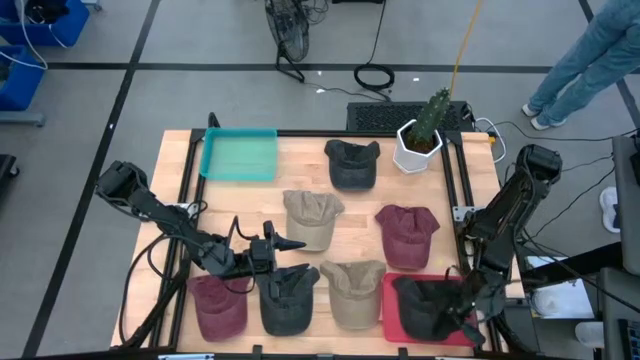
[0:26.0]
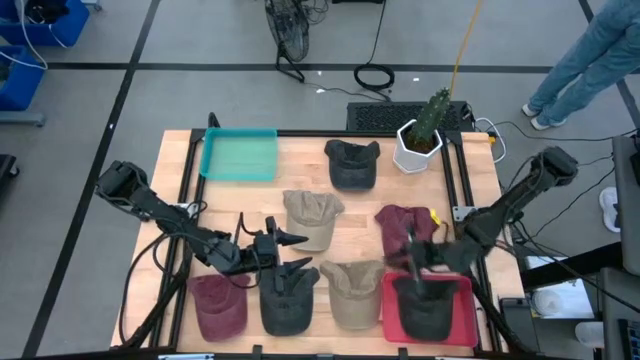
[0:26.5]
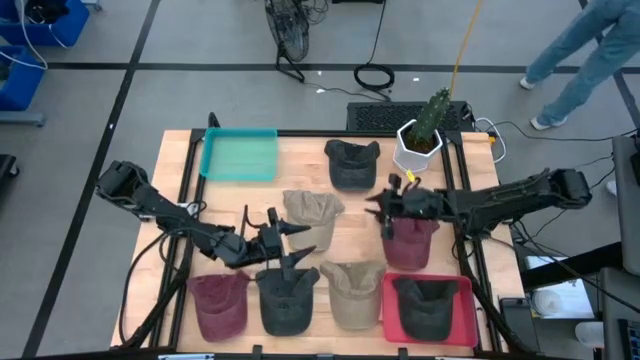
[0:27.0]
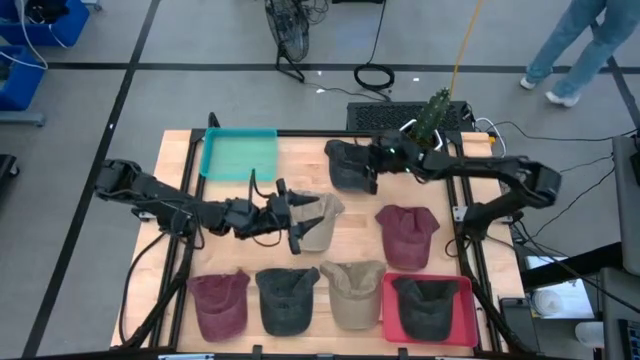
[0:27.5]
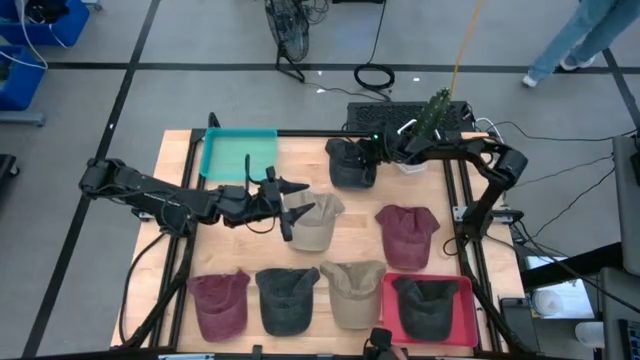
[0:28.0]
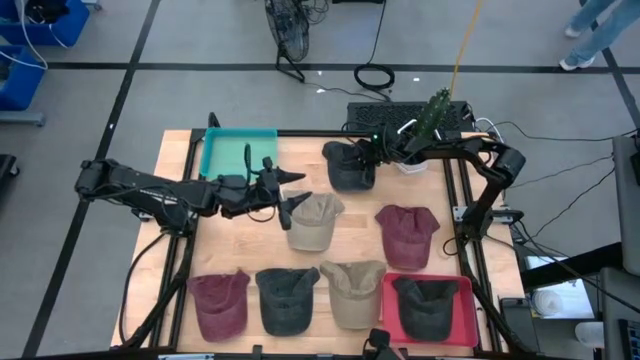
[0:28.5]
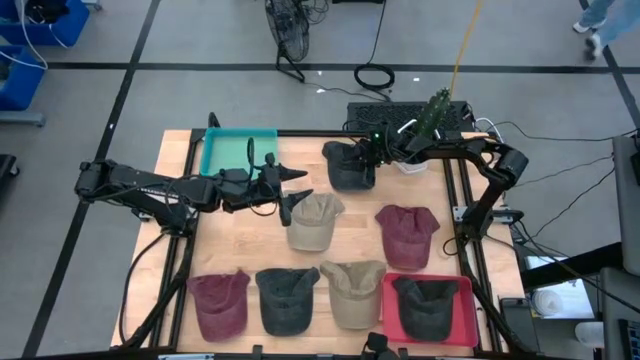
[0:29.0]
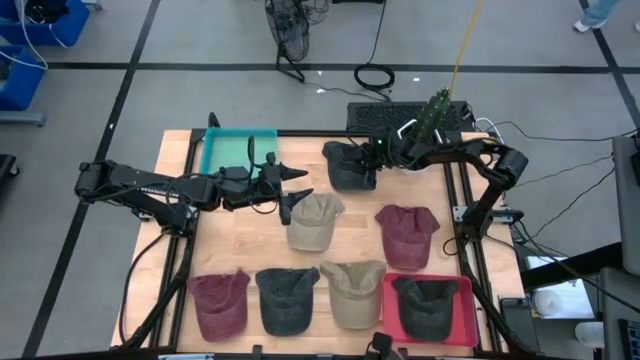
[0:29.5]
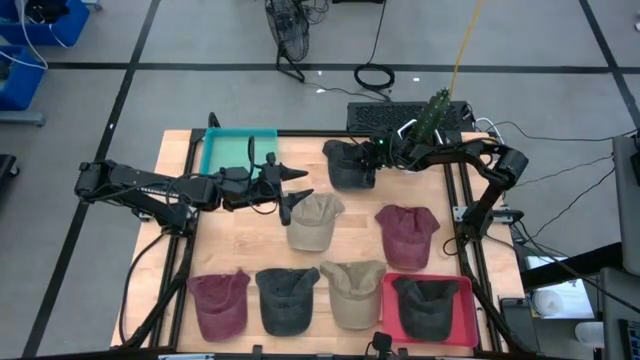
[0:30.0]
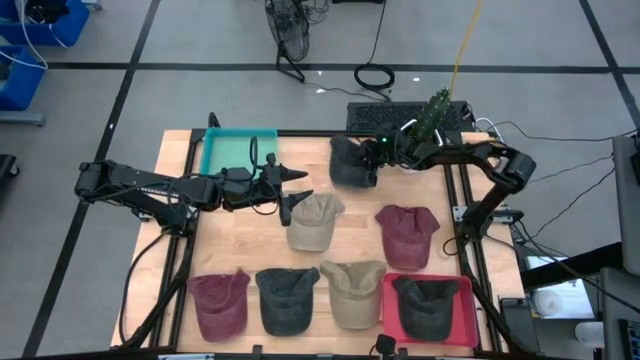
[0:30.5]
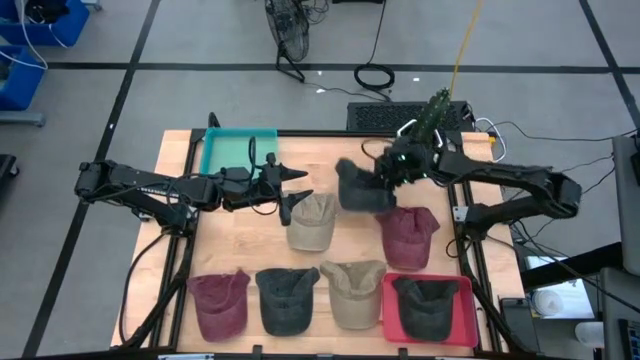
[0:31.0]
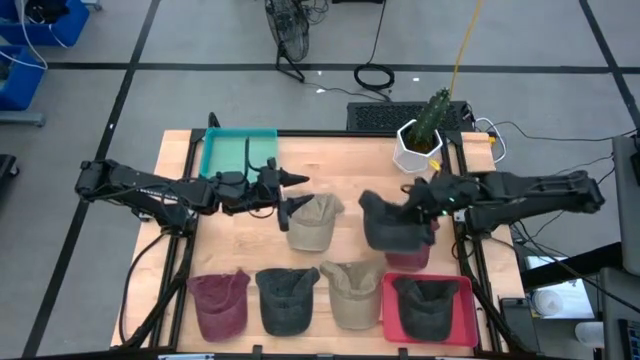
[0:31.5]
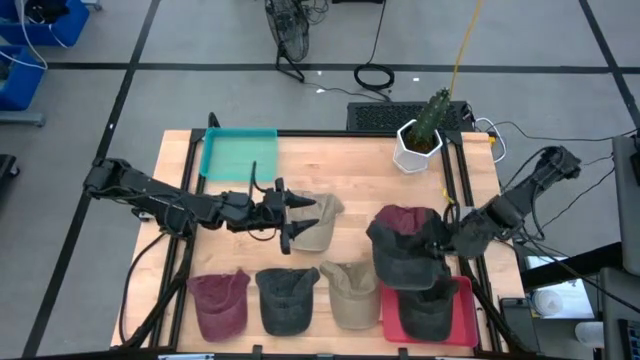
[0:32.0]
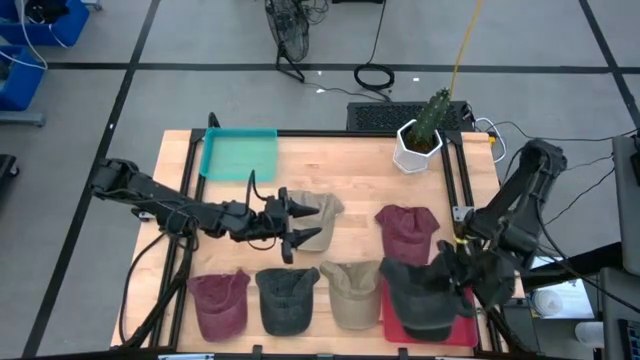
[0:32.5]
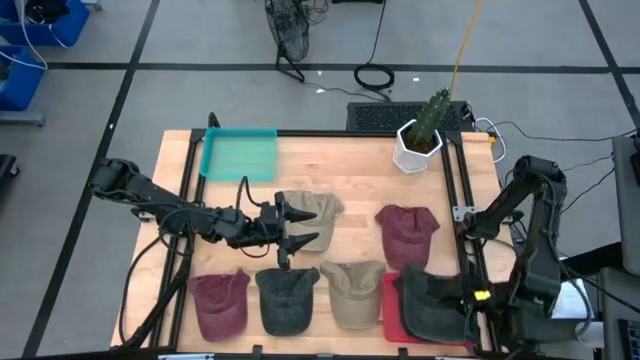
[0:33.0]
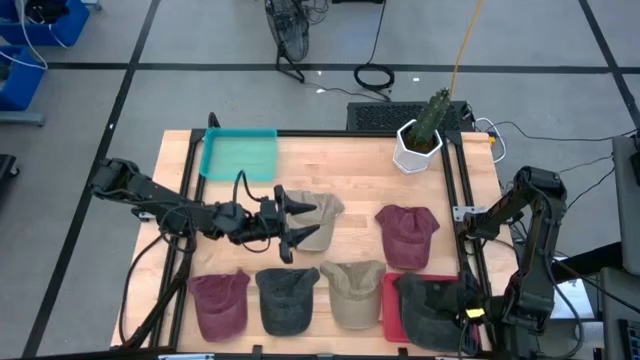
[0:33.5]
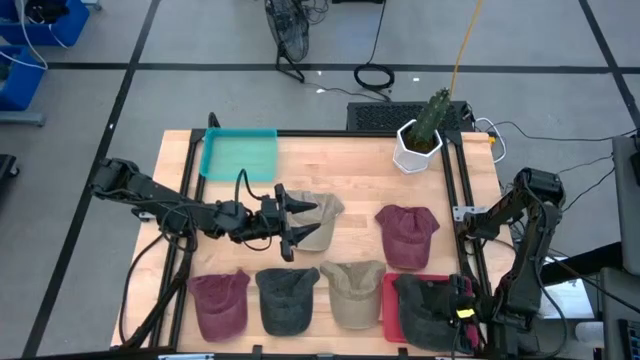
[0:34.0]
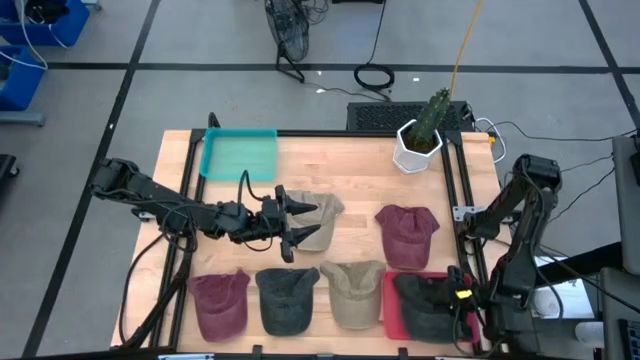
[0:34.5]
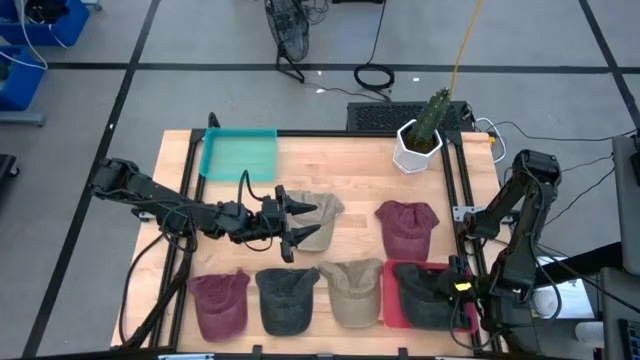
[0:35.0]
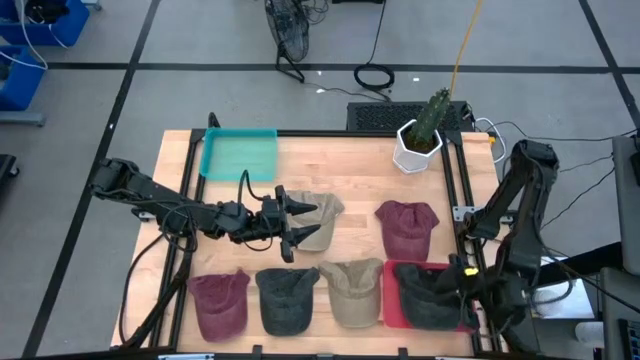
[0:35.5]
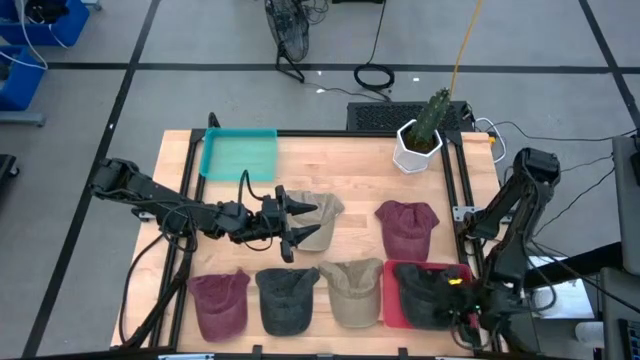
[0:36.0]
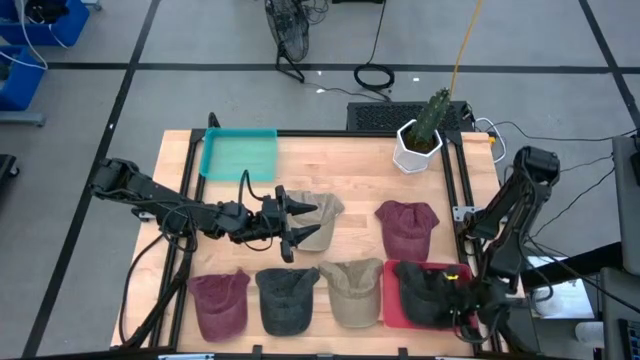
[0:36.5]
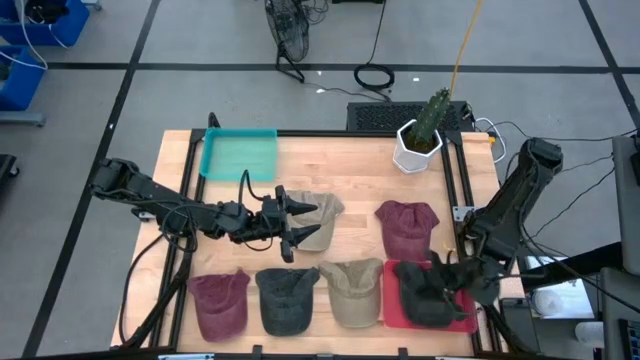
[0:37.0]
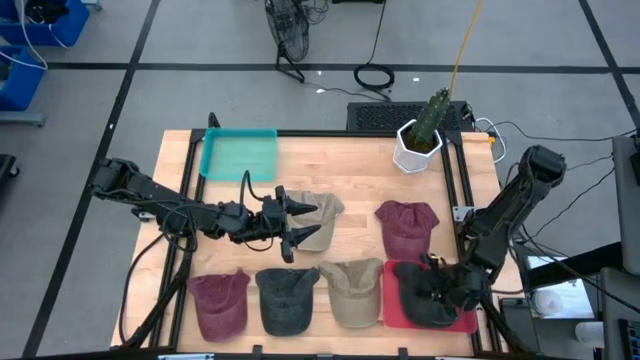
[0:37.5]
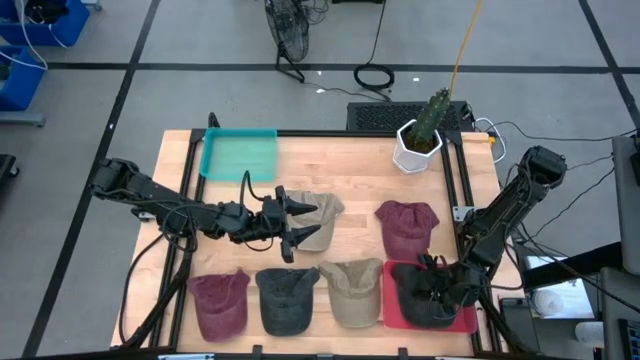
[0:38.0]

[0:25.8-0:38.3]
Task: Pick & Place hat
Put the top black cap into the red bin

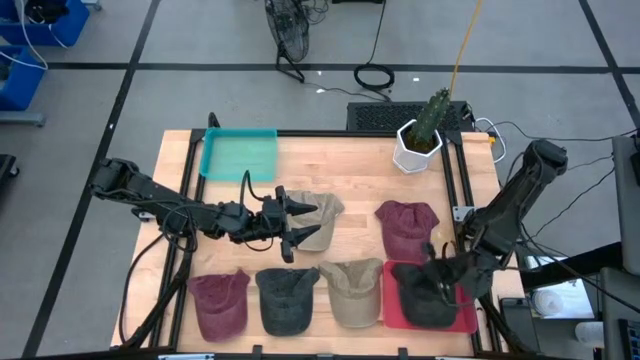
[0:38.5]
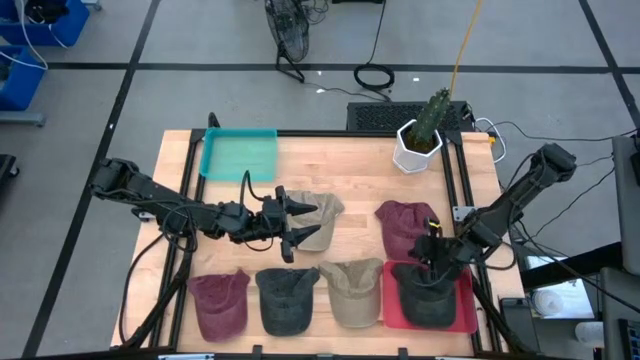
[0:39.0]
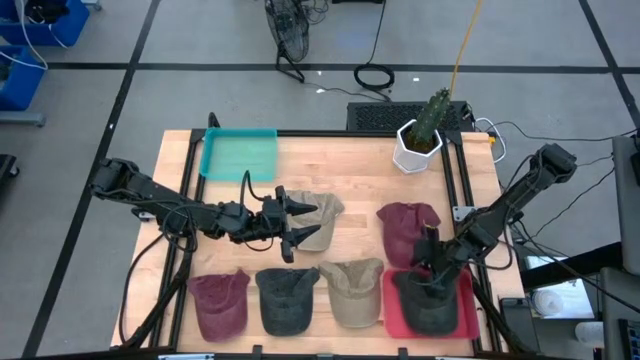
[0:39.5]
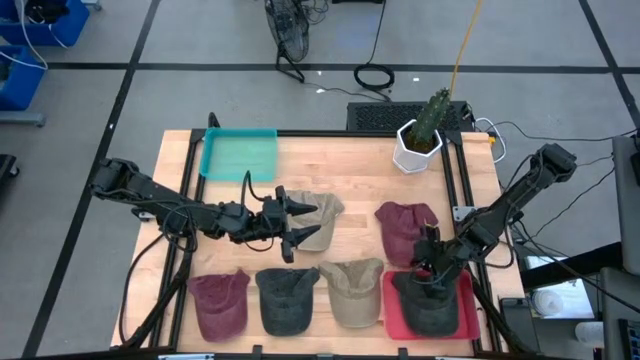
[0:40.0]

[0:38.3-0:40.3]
Adjust the red bin on the table

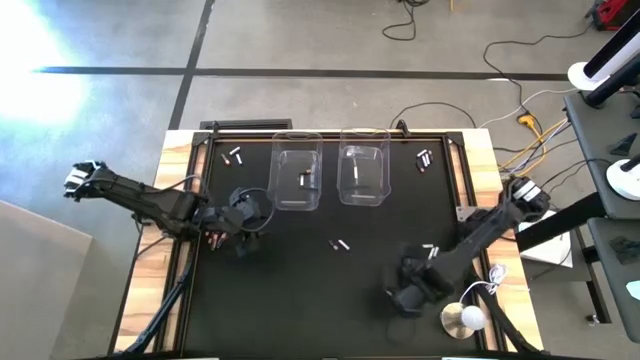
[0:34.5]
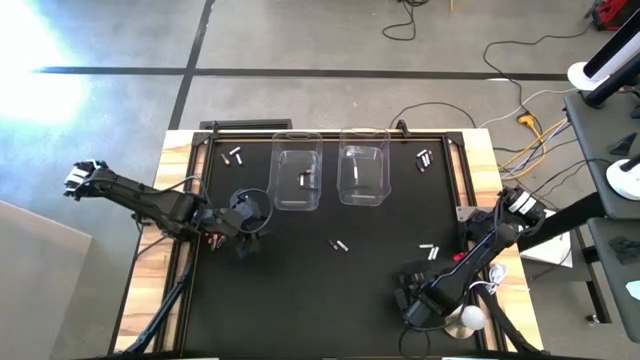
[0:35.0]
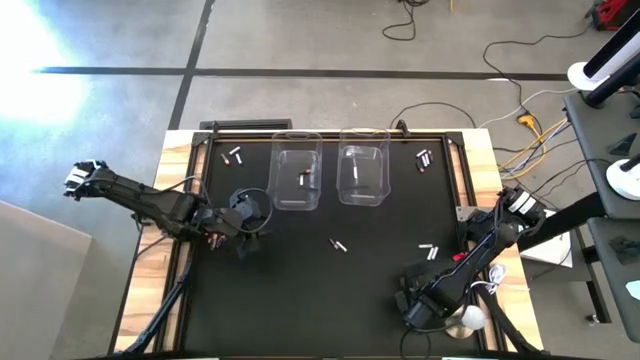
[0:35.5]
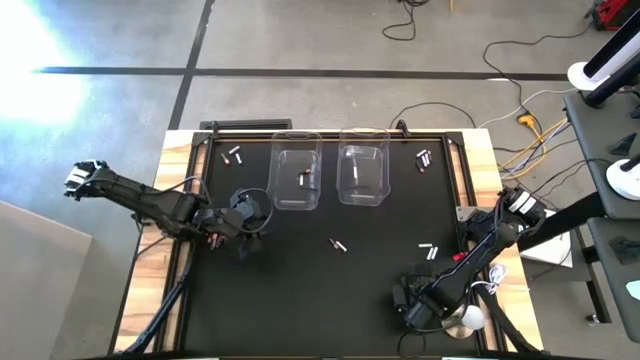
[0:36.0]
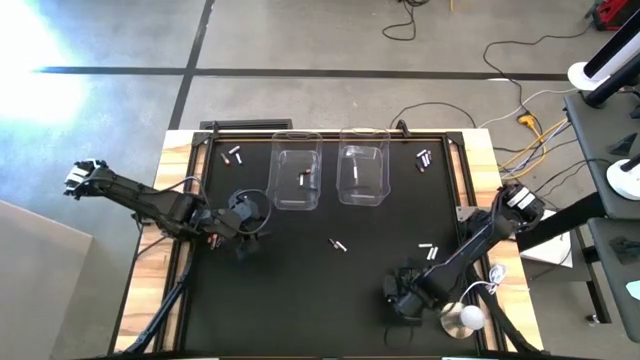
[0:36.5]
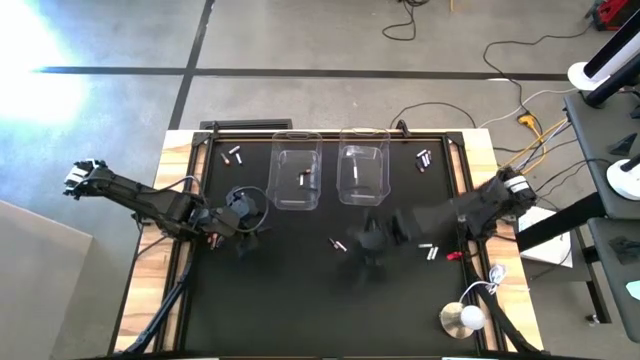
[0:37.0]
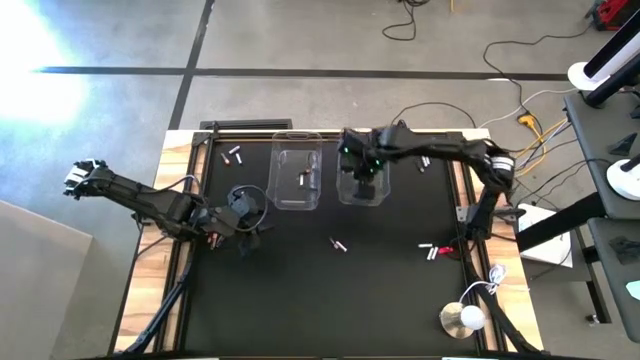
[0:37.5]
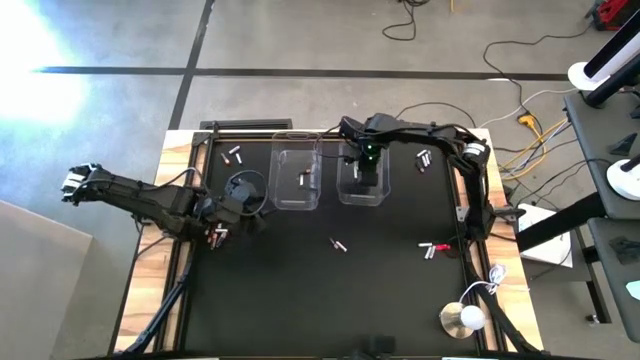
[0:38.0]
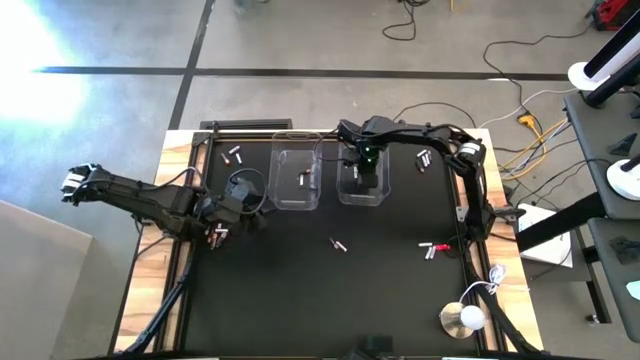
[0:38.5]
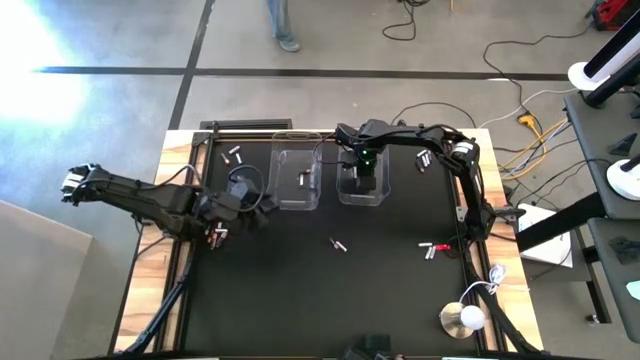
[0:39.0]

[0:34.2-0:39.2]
Task: Sort batteries
Put the white battery into the right transparent bin

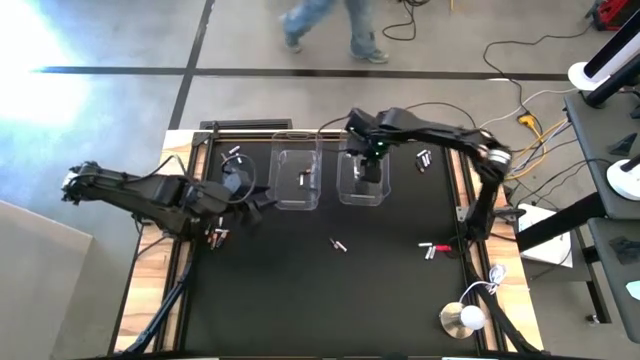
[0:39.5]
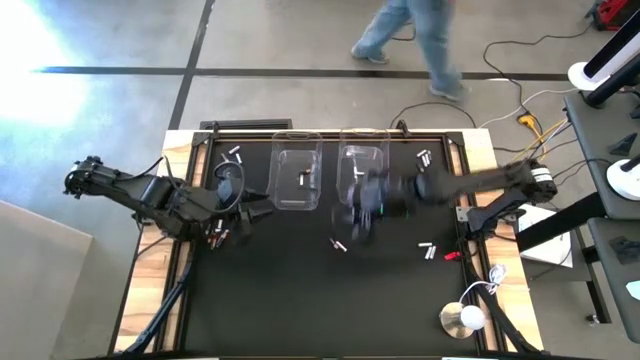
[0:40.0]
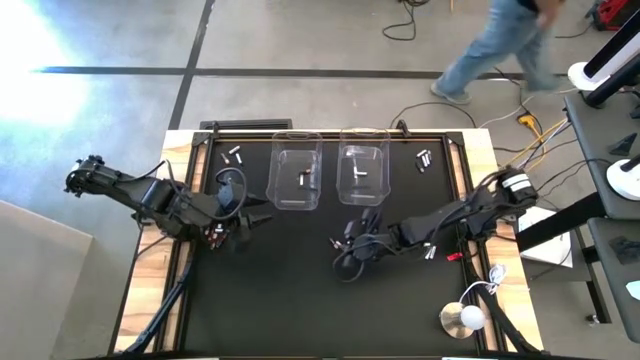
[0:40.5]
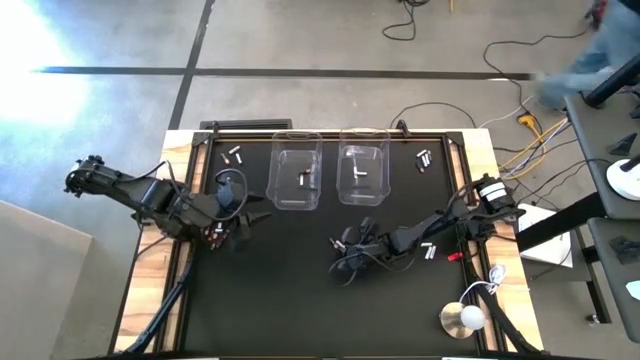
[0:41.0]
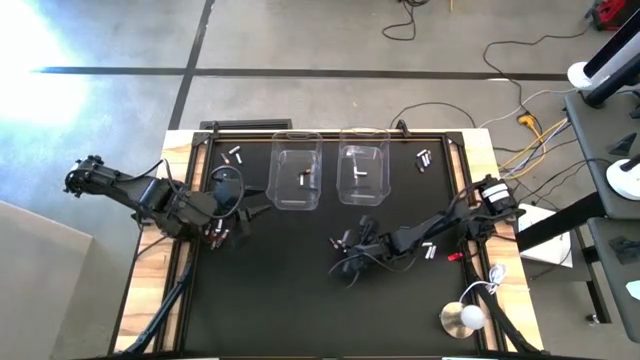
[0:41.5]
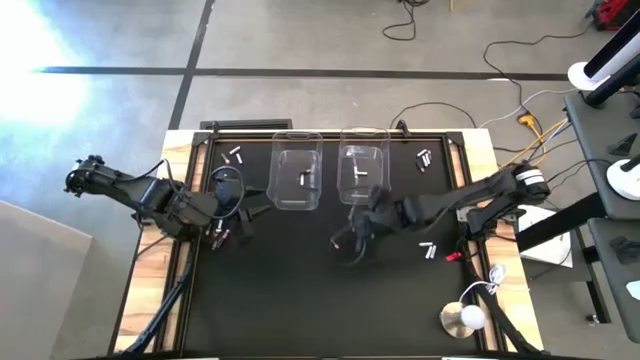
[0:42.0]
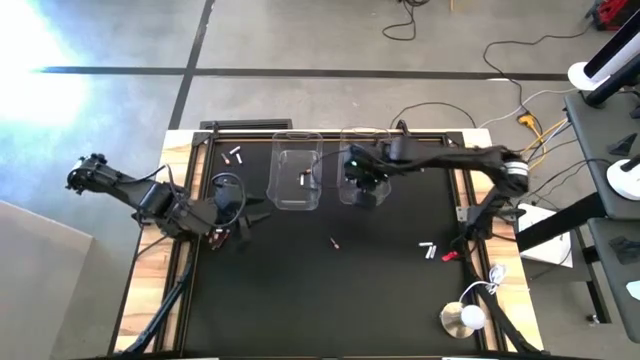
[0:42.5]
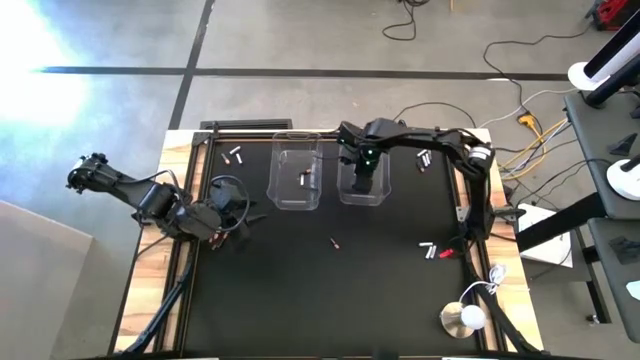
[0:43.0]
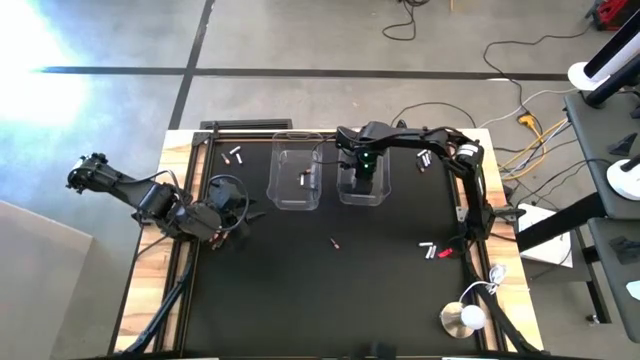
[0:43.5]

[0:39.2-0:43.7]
Put the white battery into the right transparent bin
